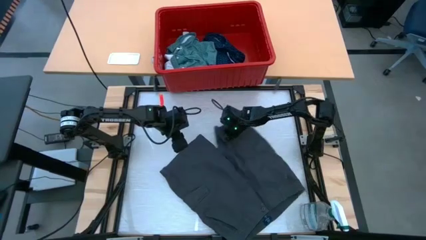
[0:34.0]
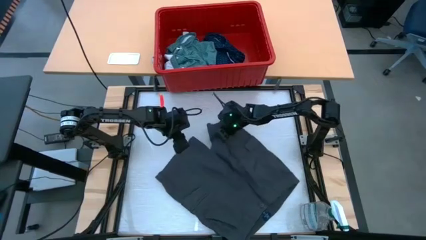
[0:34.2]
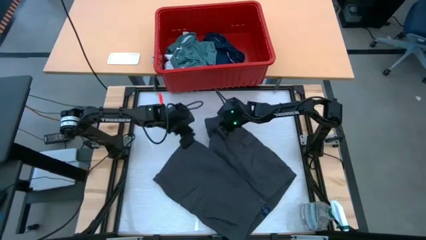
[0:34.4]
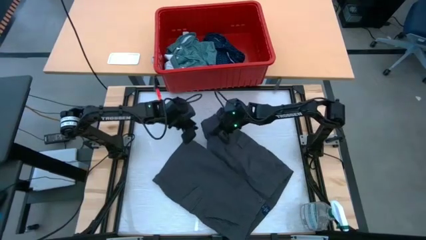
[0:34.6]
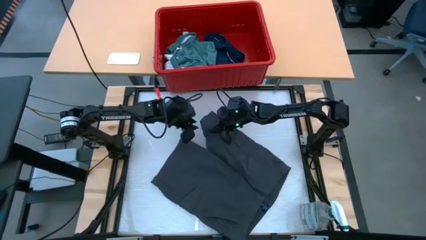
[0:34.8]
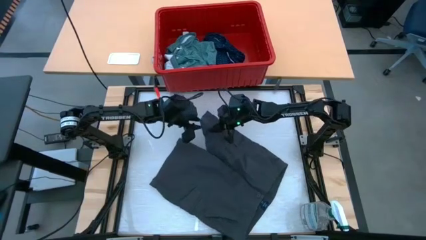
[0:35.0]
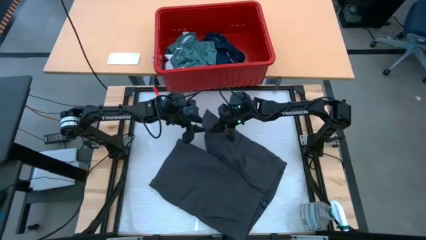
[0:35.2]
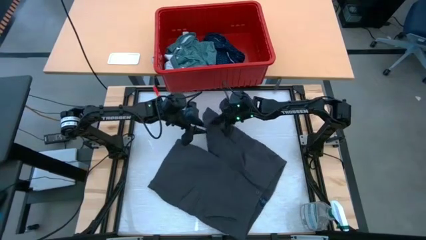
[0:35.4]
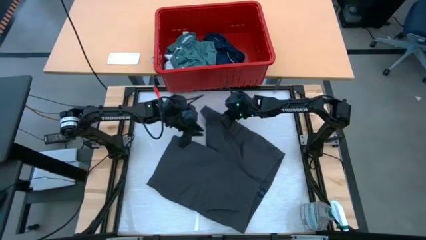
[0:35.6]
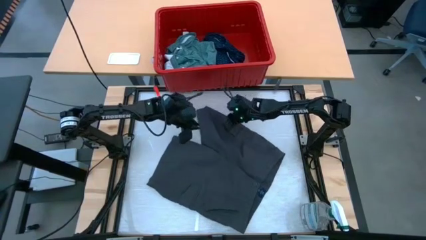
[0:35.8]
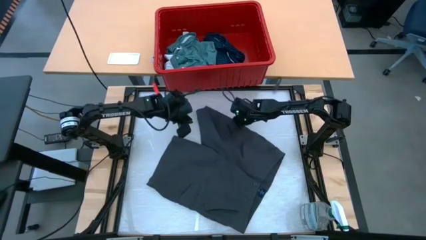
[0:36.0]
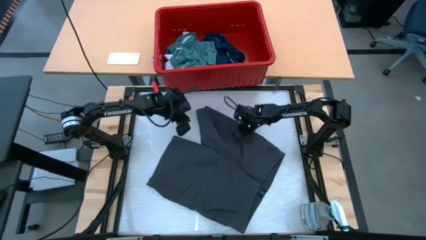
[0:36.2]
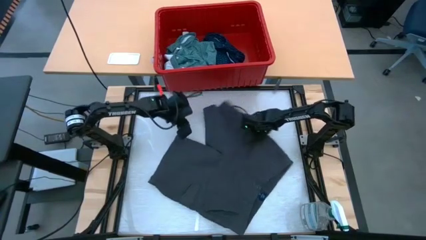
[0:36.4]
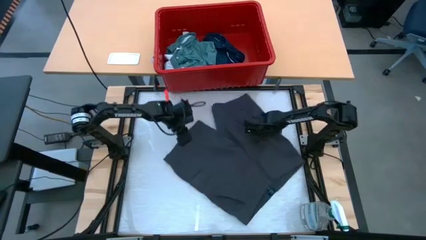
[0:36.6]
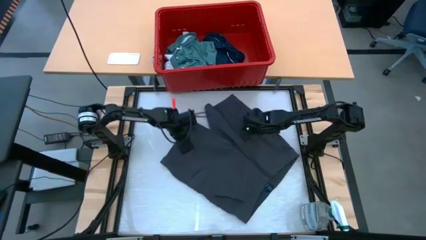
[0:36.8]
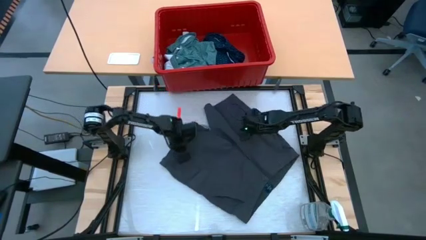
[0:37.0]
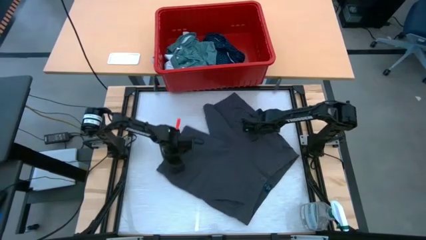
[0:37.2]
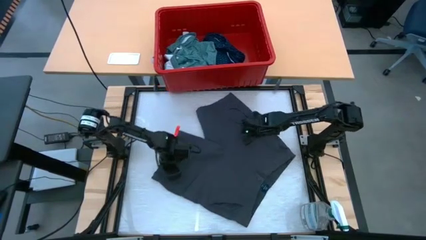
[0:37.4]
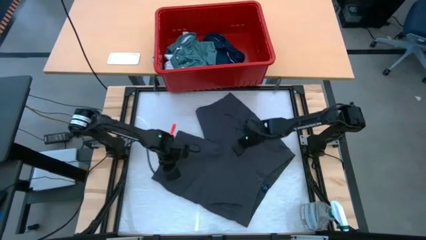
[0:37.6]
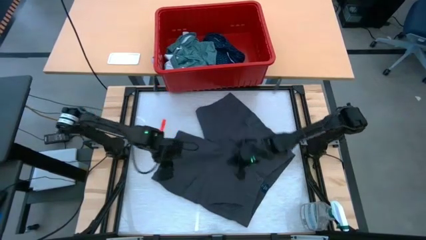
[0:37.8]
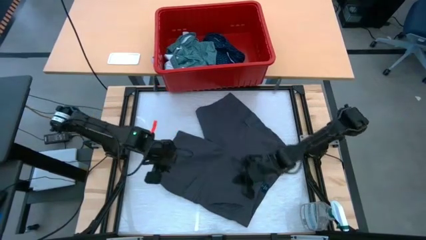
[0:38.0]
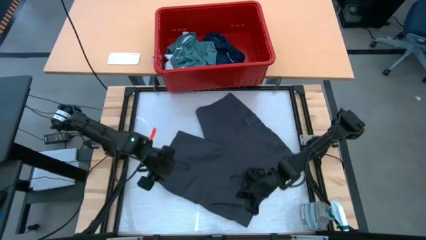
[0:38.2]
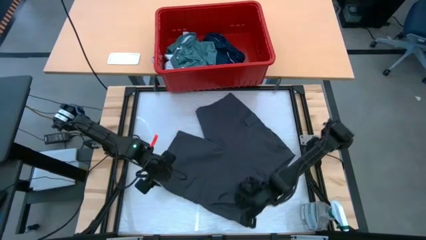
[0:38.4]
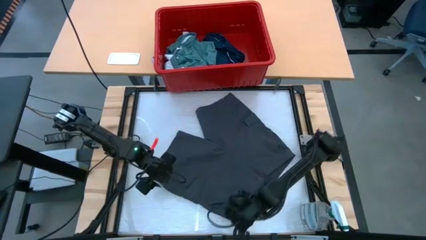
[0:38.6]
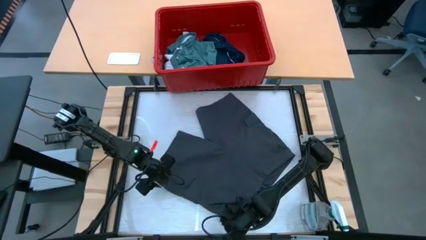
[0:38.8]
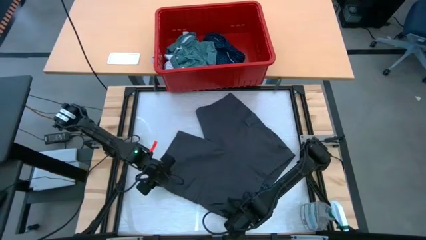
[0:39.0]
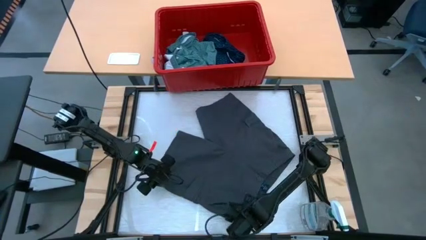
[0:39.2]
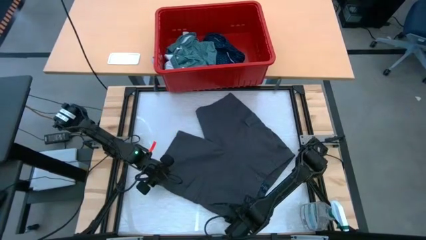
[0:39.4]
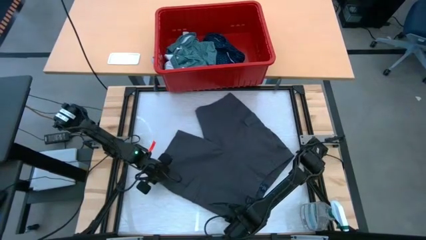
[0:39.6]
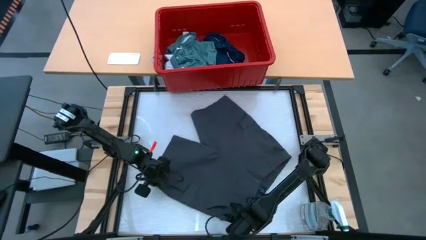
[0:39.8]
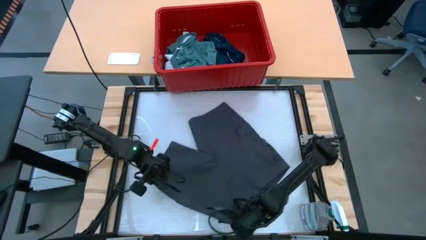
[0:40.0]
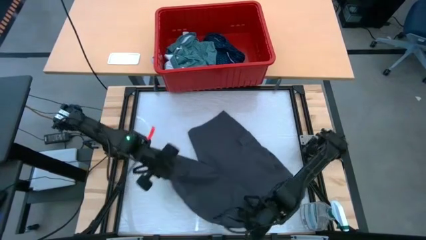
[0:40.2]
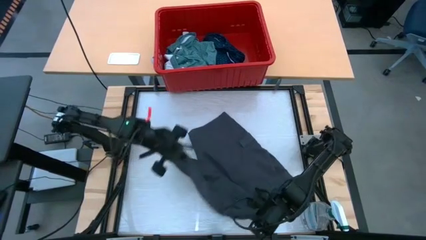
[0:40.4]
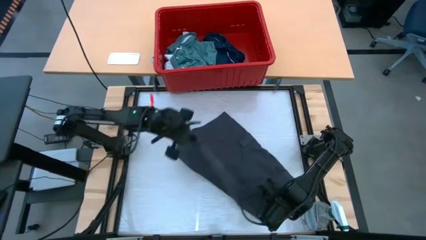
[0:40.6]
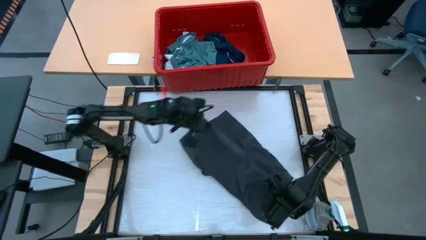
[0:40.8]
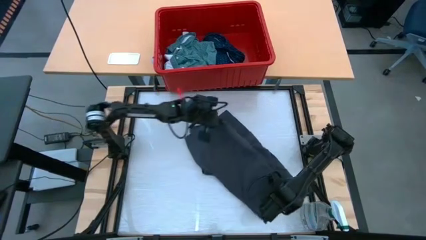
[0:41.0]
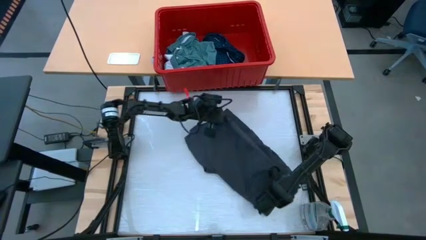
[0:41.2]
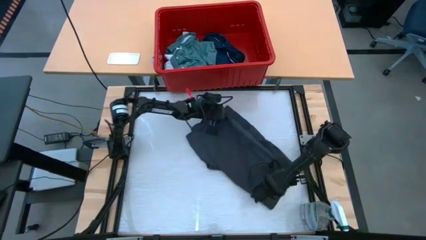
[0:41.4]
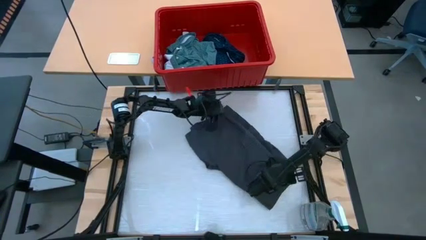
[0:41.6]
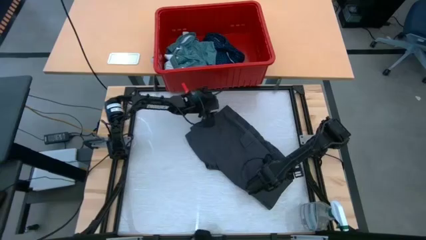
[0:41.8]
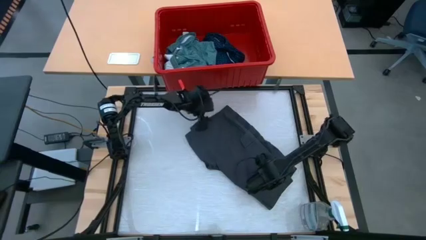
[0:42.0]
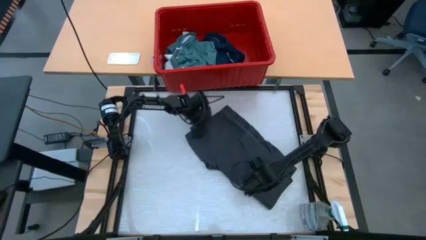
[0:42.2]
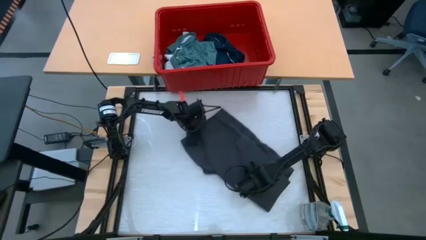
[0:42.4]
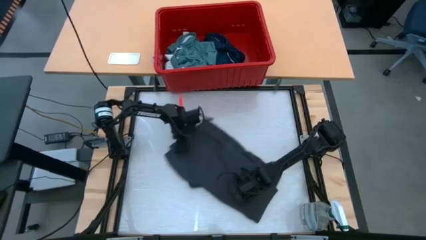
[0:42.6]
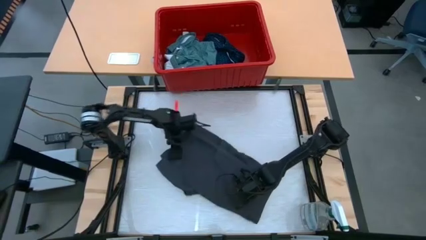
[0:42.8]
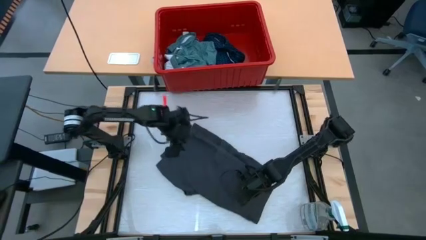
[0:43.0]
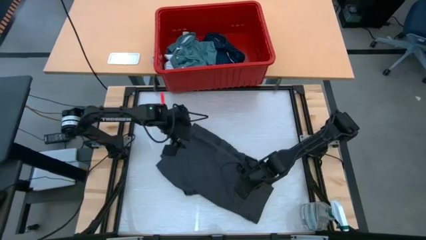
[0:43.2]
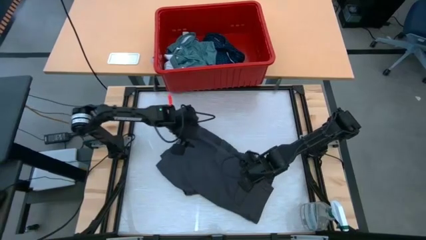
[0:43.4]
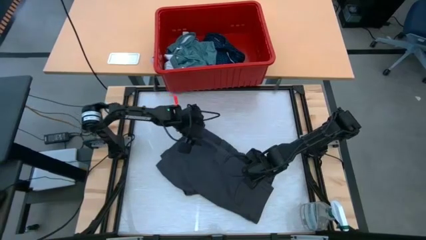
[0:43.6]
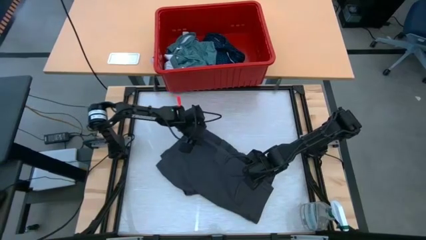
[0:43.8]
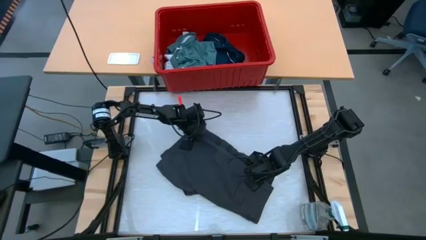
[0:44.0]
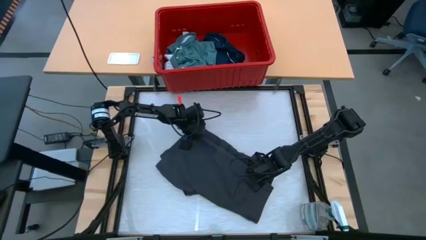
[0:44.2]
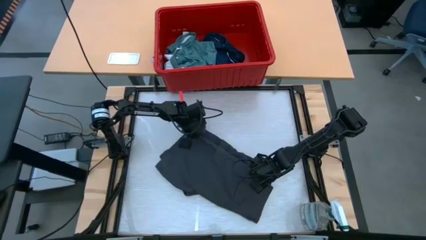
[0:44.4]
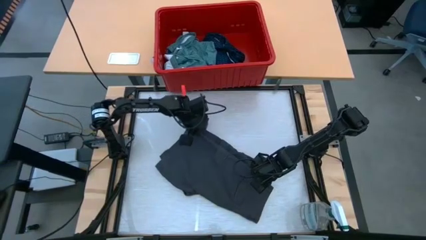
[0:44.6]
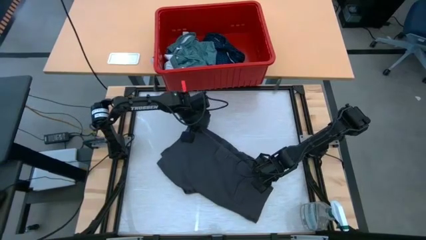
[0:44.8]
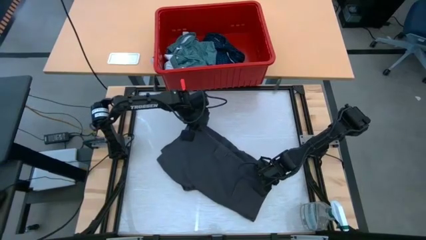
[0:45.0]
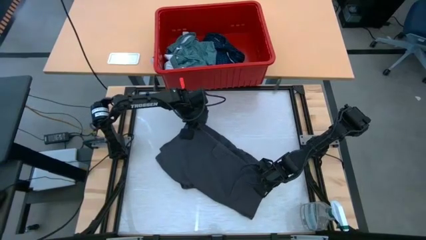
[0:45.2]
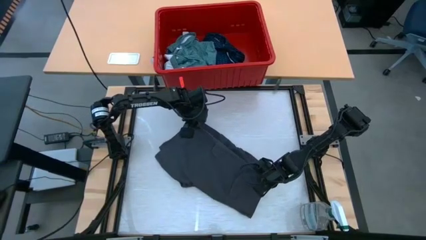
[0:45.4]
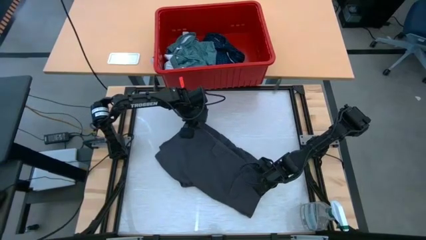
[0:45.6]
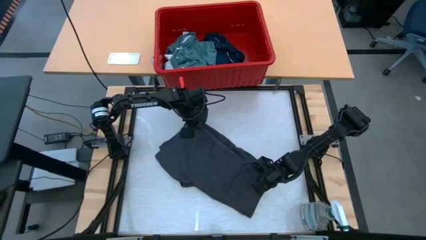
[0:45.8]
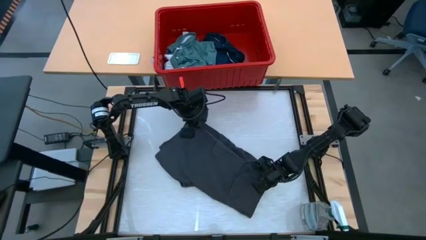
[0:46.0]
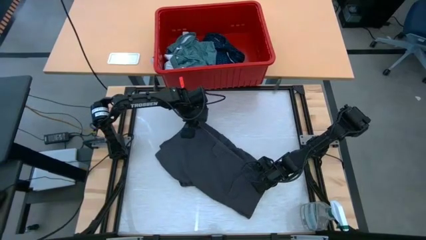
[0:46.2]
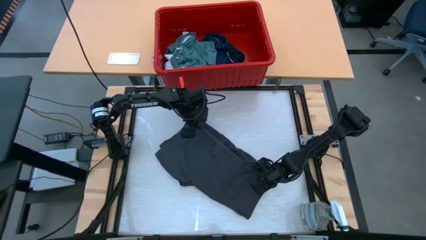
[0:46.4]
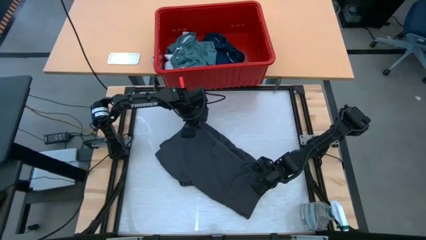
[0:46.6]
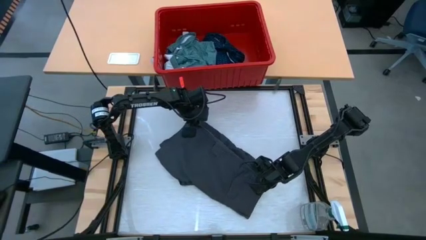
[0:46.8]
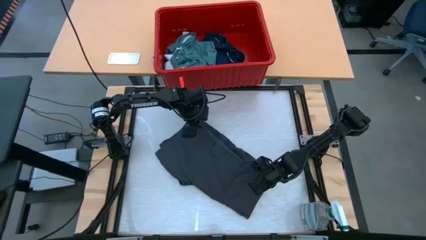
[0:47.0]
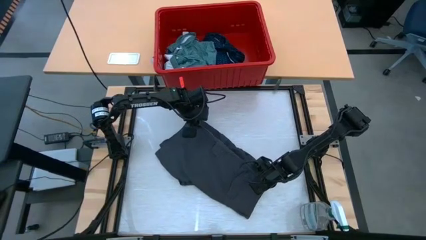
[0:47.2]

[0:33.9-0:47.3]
Task: Fold laundry
Fold the black pants

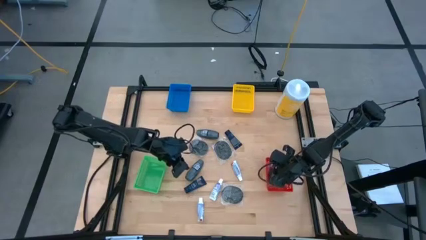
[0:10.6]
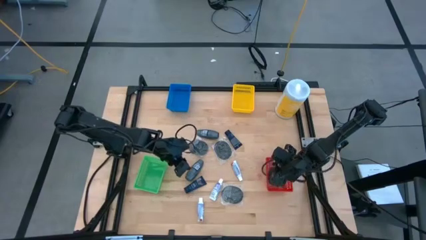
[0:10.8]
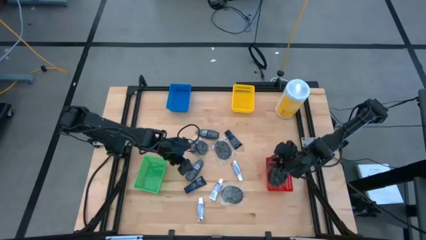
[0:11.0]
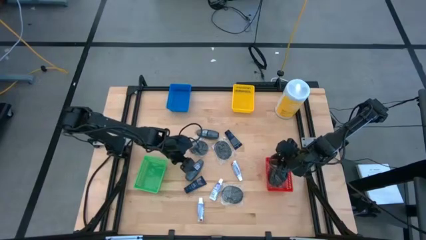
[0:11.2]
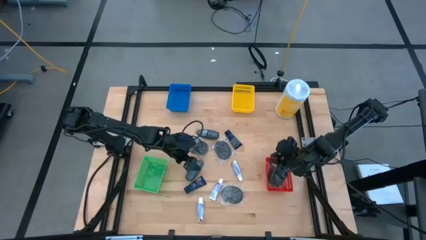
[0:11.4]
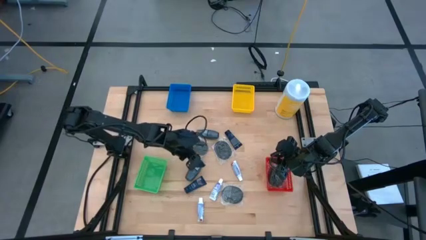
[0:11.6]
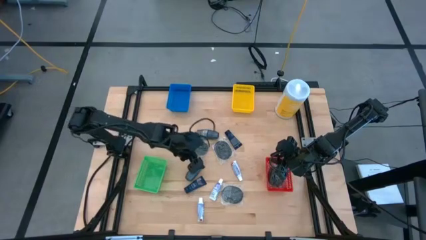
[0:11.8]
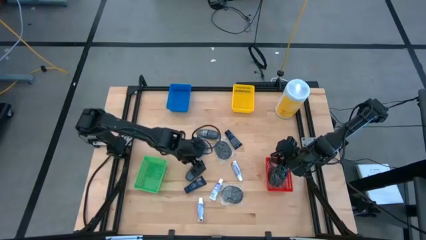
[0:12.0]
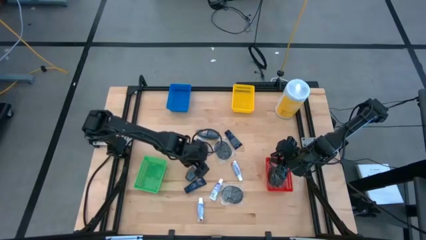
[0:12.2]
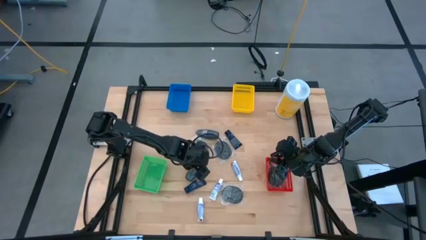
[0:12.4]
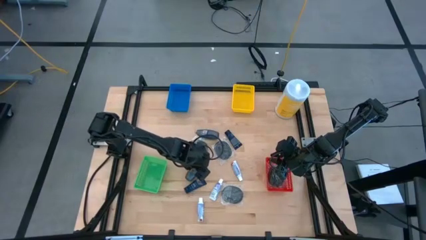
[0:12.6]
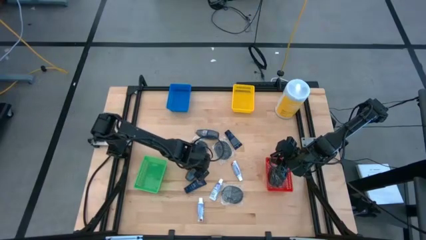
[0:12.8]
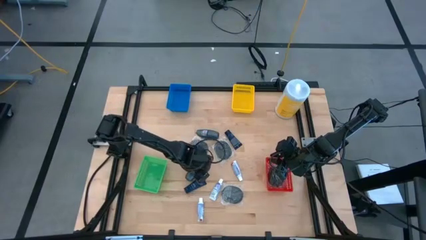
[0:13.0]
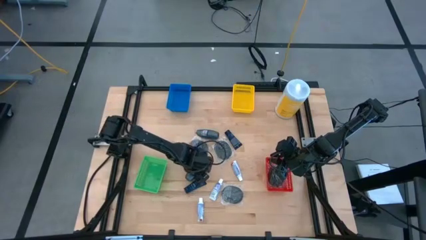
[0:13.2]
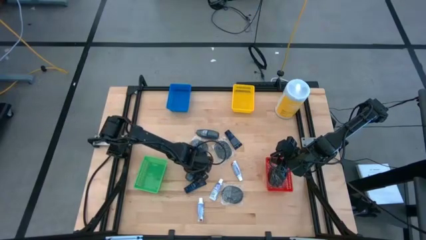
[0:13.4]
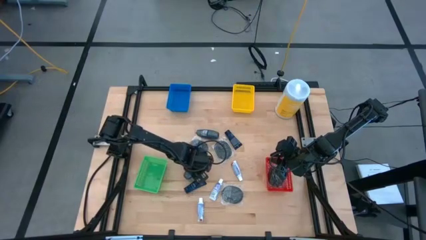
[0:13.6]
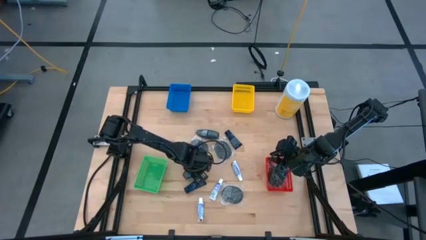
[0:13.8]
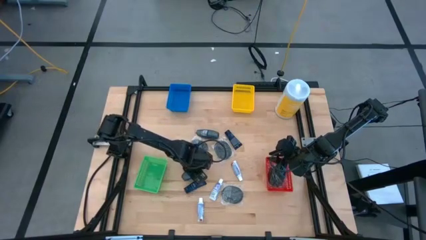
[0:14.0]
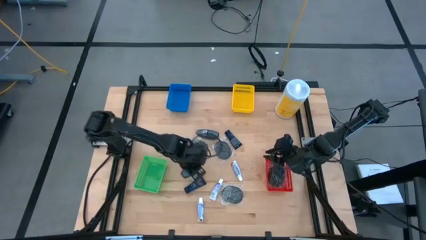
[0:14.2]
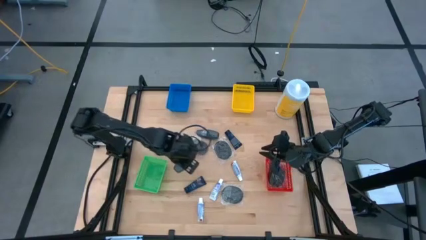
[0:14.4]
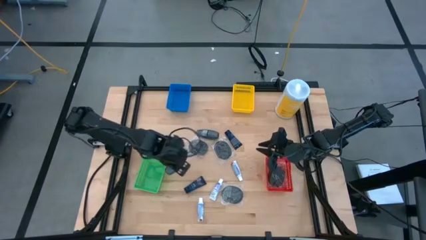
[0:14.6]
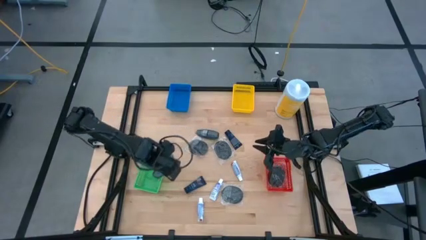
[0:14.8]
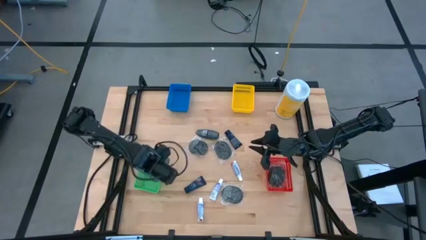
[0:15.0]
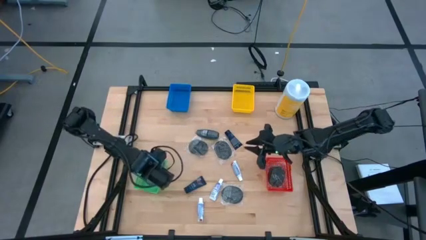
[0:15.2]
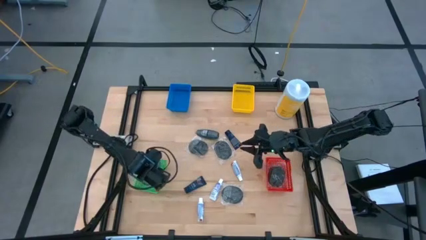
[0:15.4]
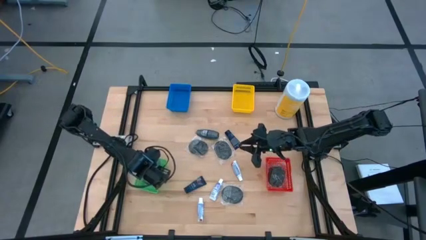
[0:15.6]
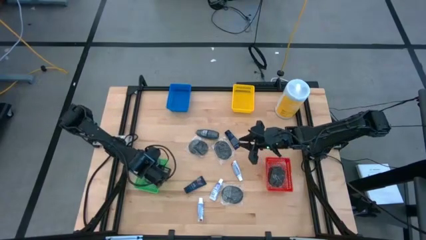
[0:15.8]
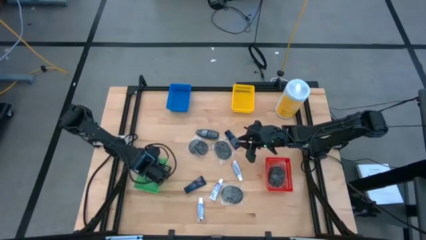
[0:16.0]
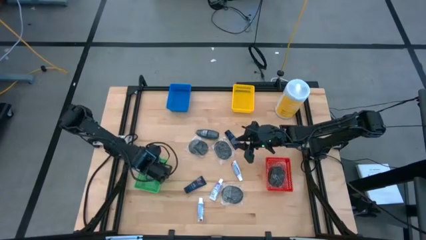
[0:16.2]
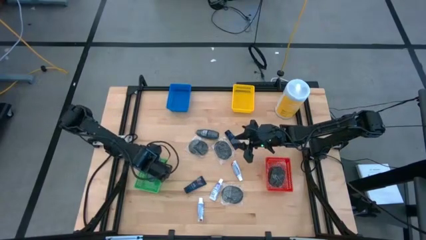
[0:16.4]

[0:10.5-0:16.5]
Task: Pick & Place Travel size toiletries
Put the deodorant into the green basket
